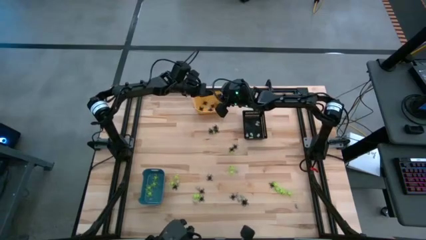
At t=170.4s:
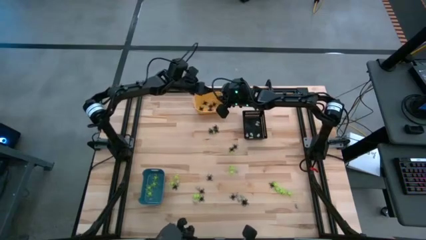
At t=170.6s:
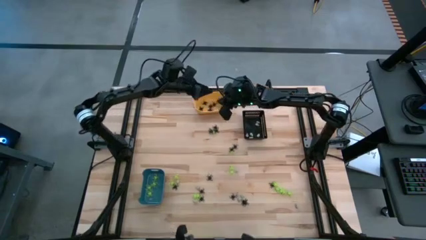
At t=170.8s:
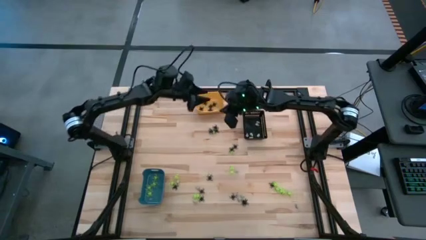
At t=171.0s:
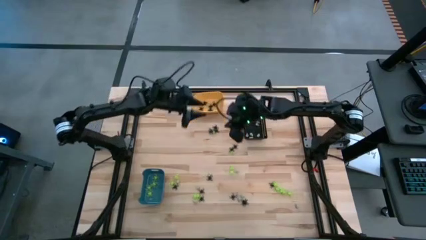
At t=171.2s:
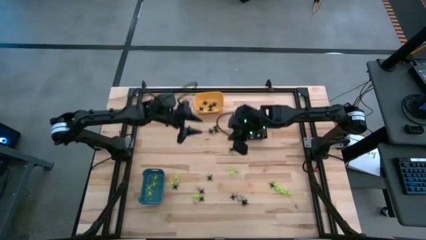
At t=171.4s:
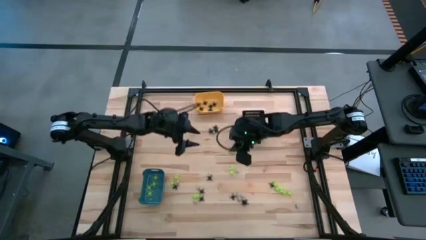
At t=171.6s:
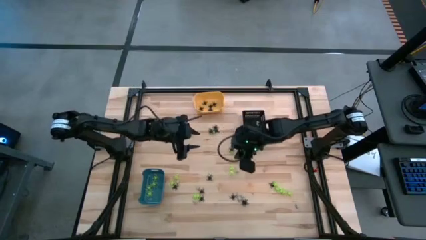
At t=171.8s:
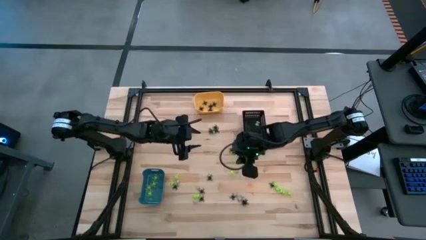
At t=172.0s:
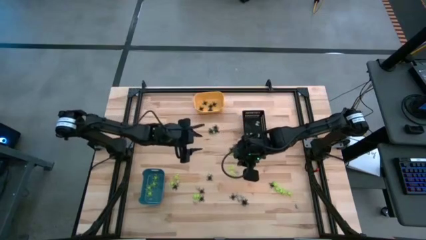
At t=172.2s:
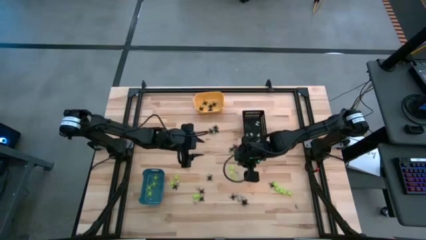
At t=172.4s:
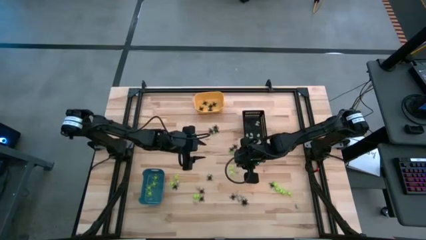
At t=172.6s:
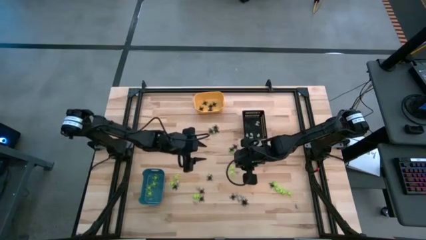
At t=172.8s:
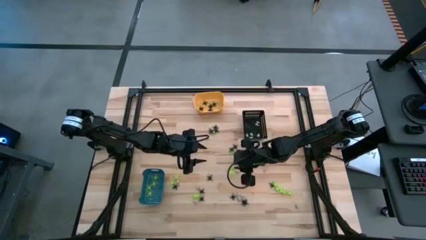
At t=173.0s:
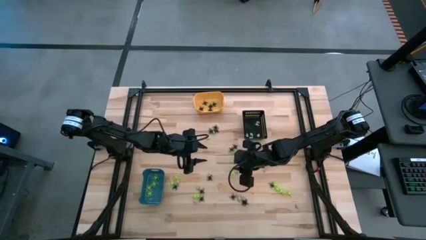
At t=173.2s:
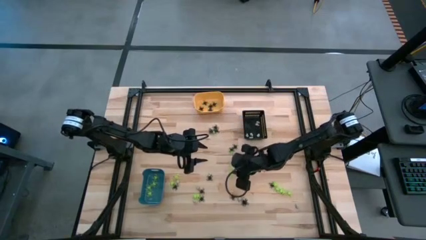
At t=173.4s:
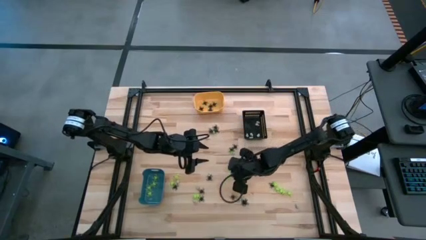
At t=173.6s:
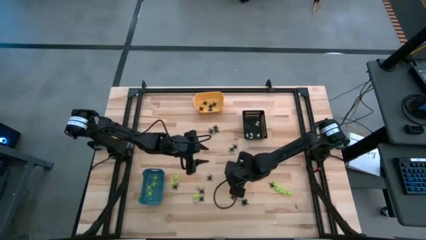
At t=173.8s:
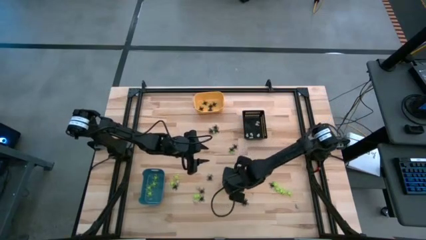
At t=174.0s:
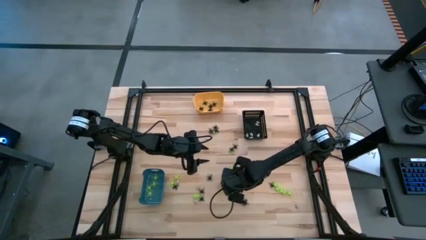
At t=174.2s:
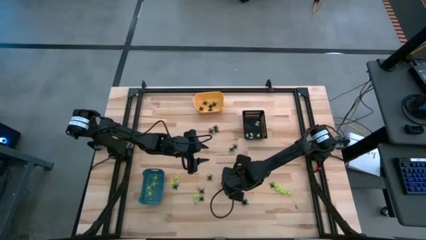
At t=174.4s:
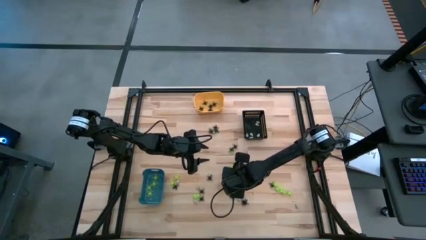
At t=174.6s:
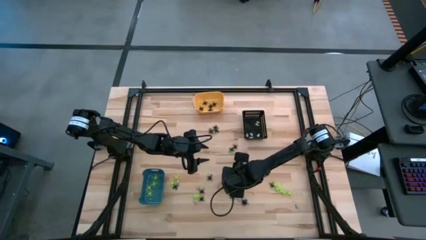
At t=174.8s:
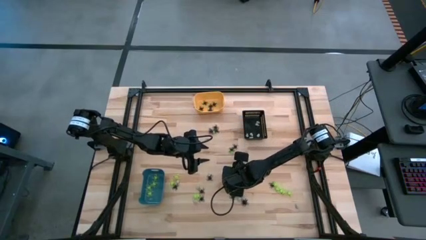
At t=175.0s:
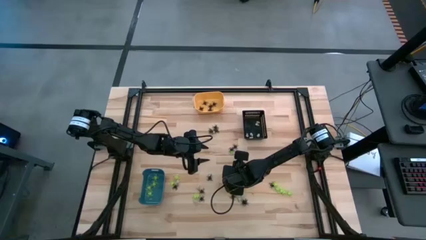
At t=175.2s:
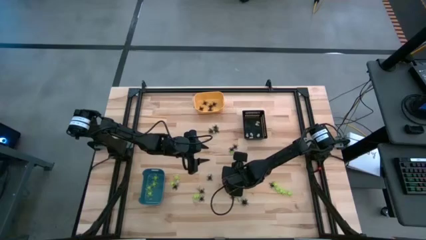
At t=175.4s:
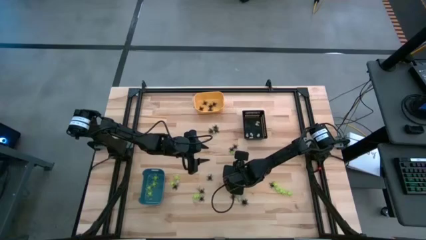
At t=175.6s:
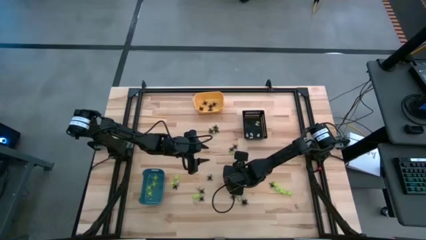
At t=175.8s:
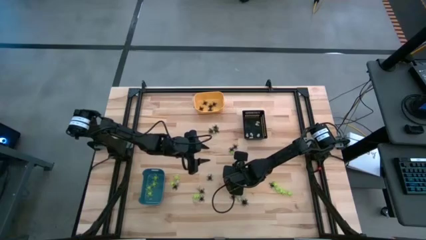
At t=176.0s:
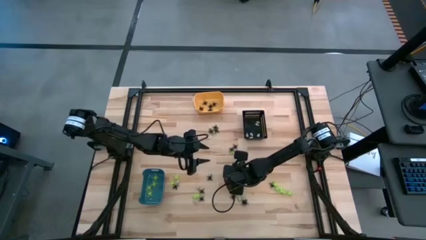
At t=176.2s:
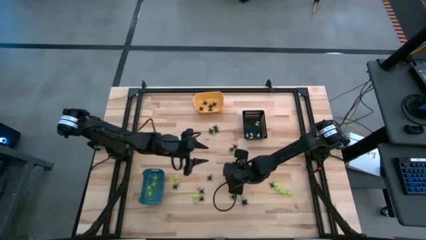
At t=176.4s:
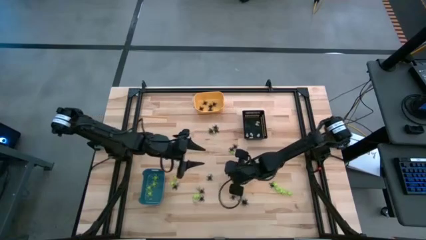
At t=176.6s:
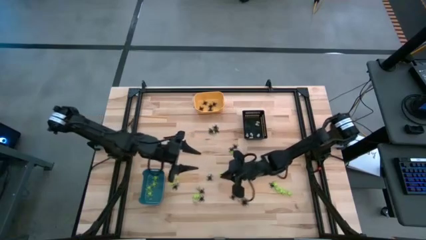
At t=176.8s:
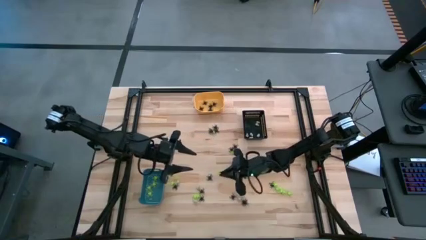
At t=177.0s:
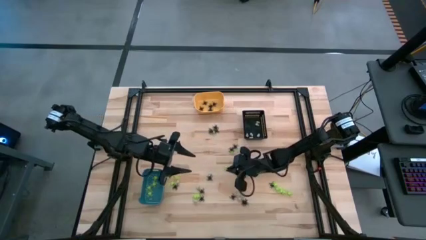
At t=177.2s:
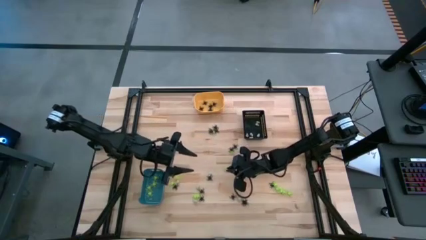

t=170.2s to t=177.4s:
Task: Sort Halloween decoration
Put the green spider toy into the blue bin

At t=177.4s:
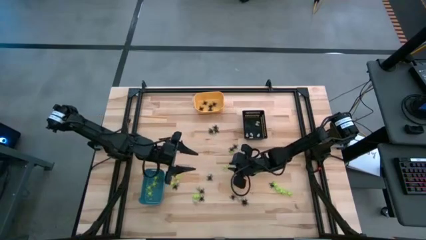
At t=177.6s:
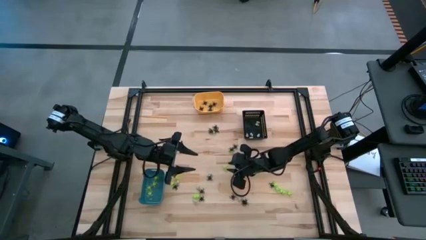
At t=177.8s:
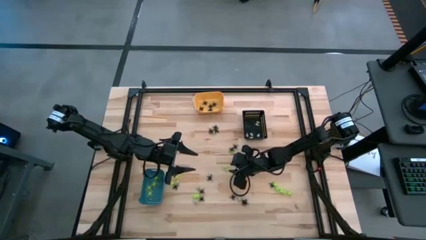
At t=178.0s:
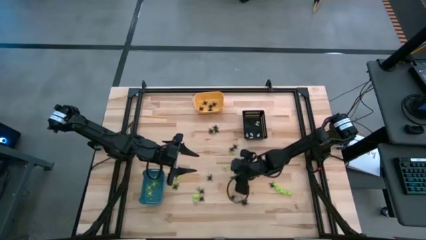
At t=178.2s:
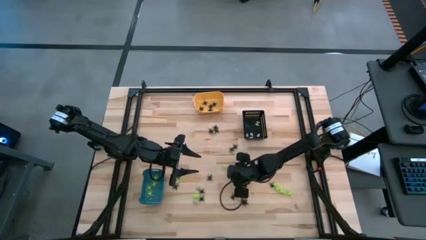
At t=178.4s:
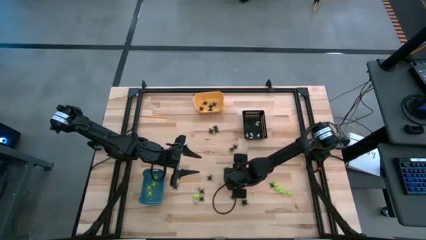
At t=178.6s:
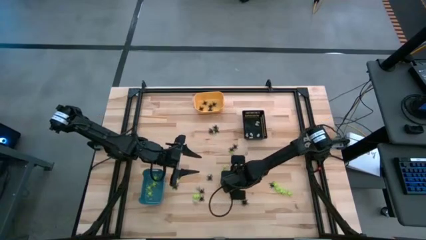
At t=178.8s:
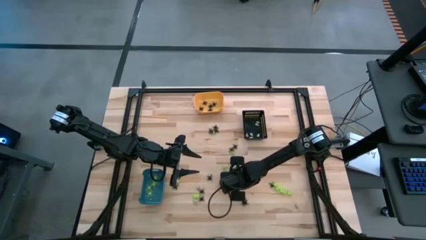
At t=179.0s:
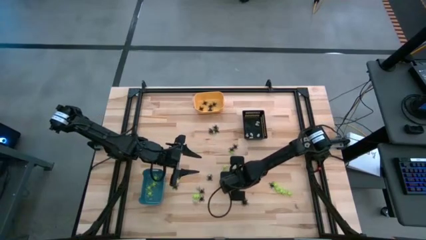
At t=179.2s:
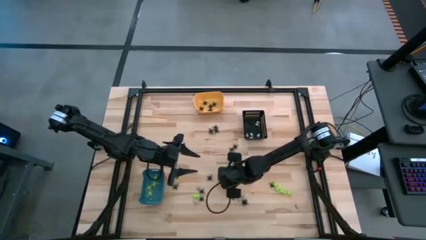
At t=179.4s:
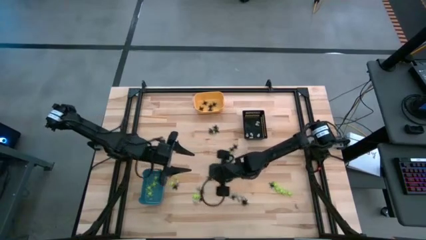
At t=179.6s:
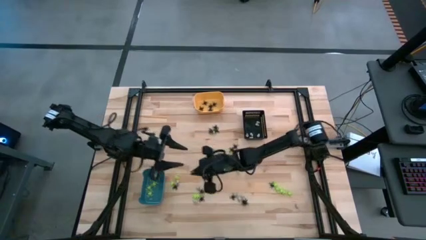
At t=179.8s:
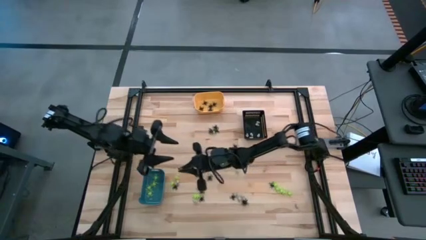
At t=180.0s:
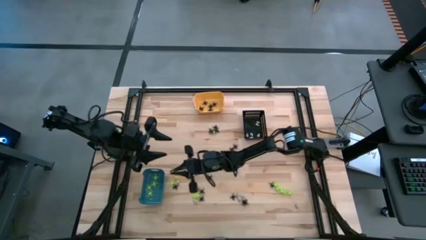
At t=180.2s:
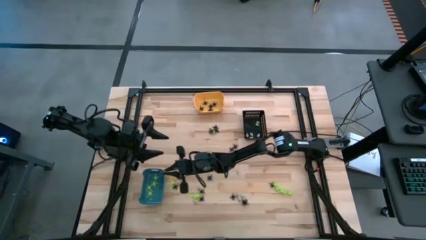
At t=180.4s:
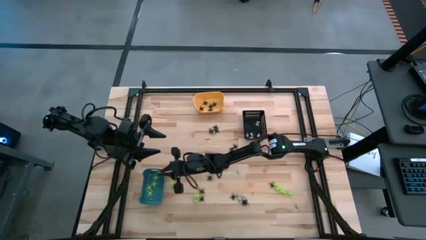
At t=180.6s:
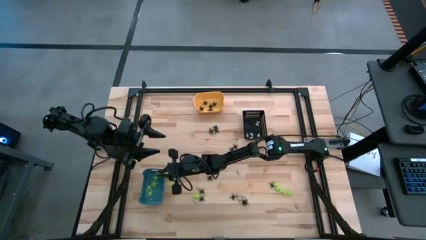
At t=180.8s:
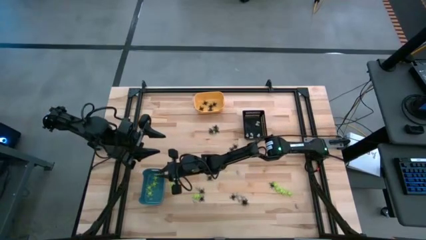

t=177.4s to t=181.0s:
Put the green spider toy into the blue bin

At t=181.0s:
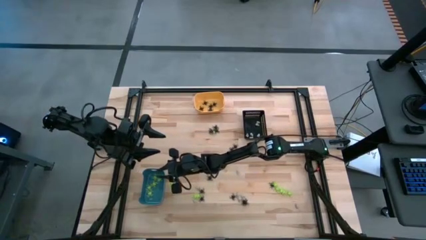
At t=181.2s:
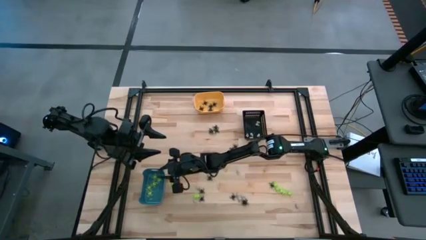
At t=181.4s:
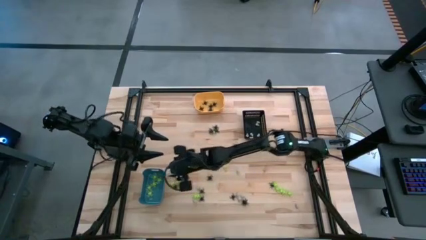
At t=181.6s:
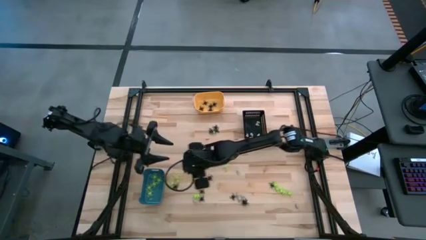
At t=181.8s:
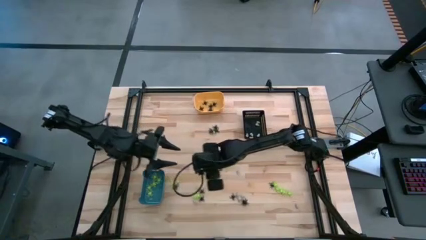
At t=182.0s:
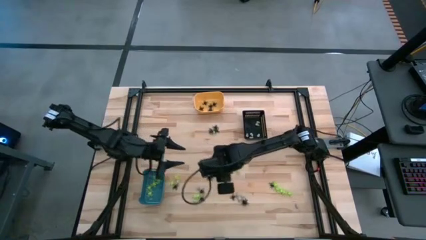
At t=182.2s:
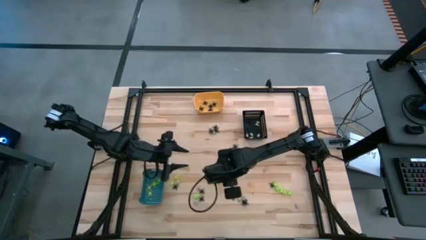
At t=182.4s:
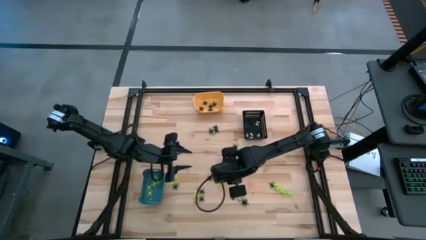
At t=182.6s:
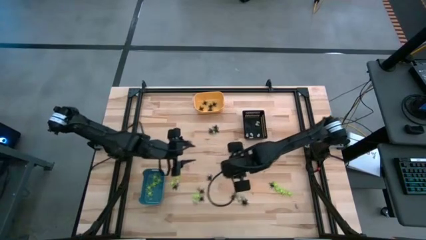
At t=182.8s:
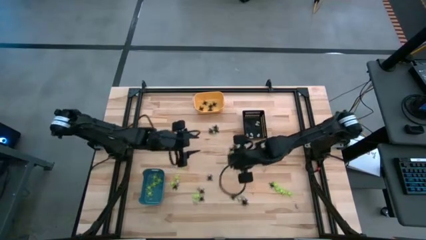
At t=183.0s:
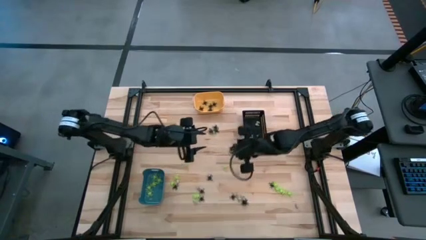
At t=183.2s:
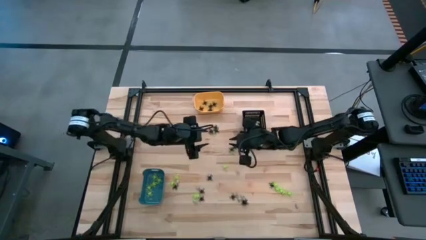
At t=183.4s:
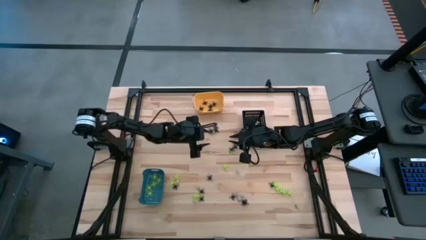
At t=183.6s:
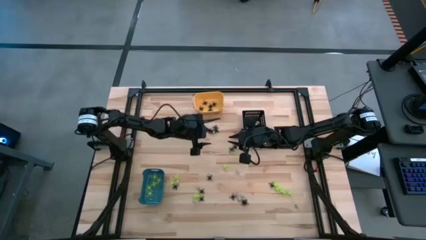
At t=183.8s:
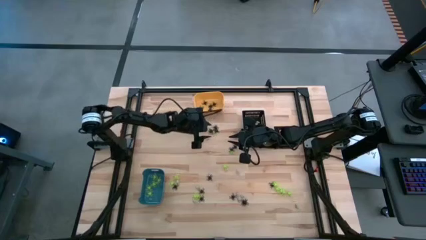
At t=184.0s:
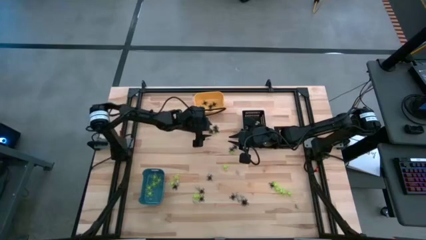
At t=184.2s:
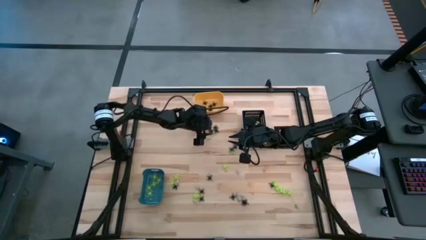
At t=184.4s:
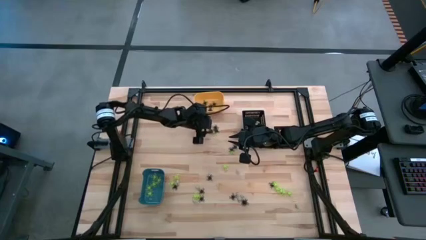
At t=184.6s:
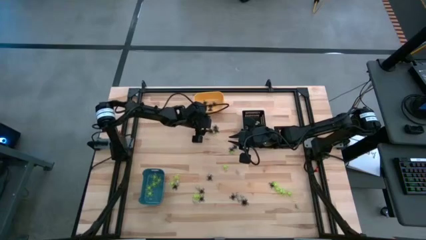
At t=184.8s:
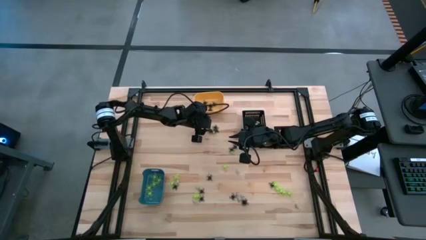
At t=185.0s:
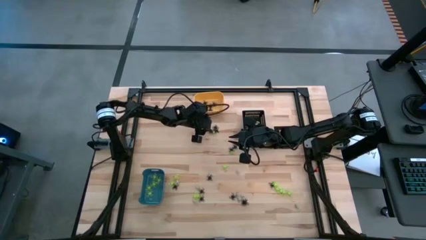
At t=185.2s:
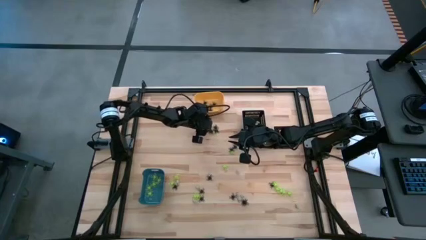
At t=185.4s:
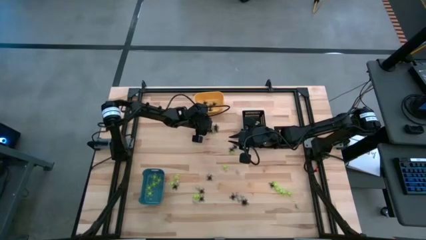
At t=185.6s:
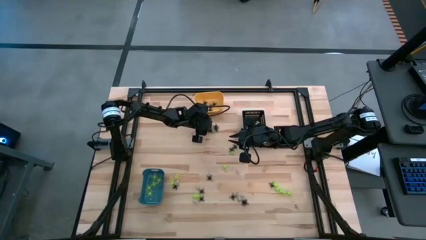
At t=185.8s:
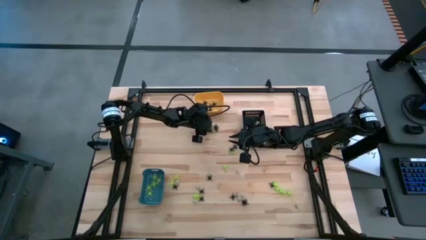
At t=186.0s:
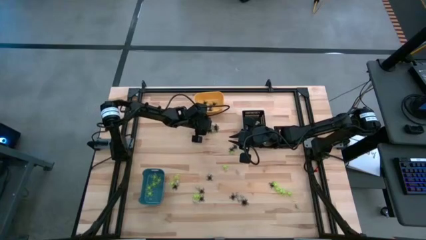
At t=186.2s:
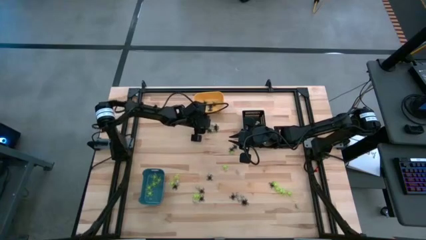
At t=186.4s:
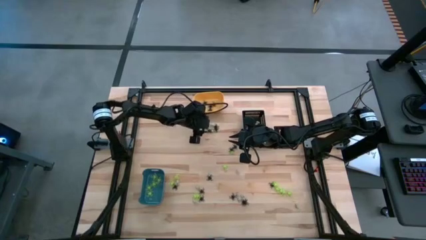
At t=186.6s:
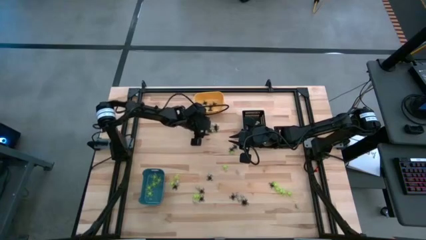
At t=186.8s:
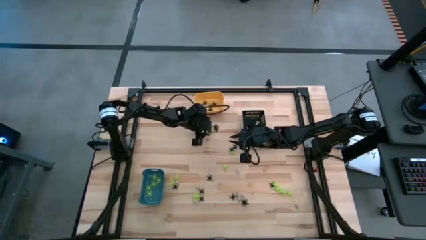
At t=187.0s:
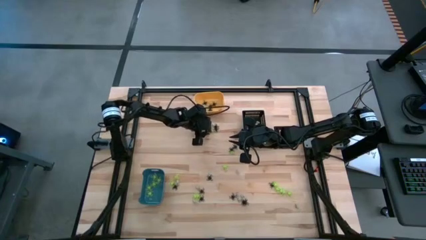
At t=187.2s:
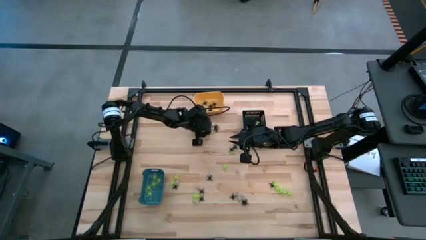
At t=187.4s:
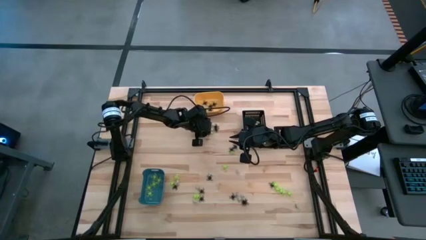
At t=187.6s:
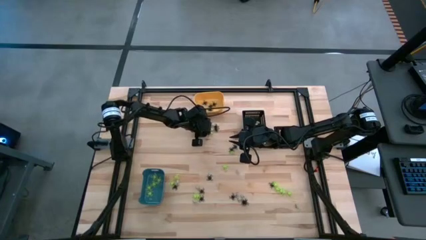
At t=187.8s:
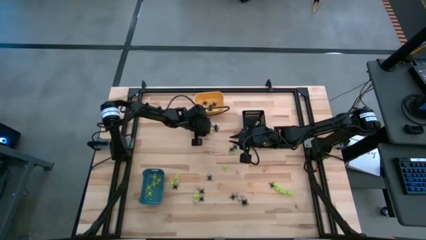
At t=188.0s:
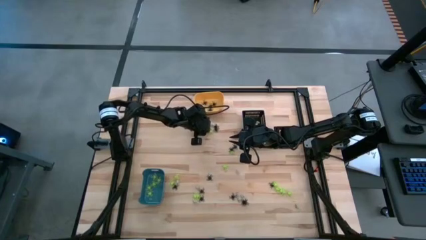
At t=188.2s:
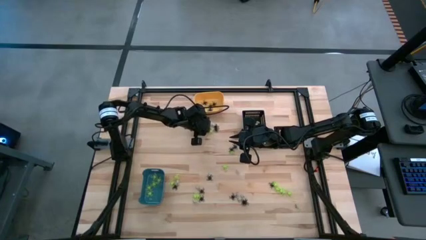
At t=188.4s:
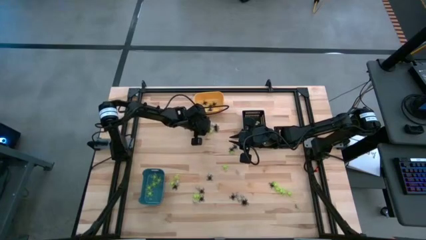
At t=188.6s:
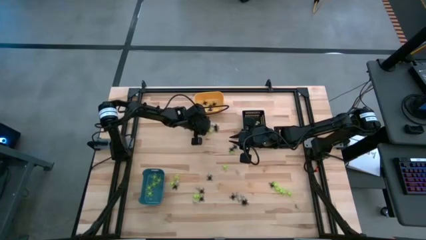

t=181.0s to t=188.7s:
Put the black spider toy into the yellow bin
